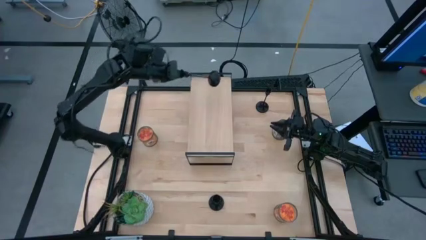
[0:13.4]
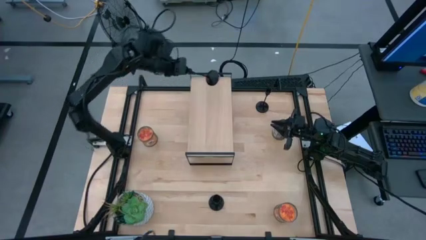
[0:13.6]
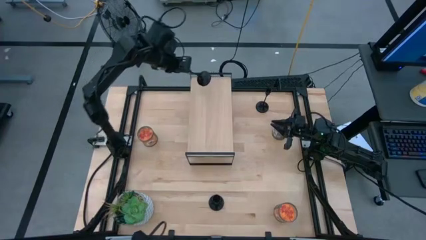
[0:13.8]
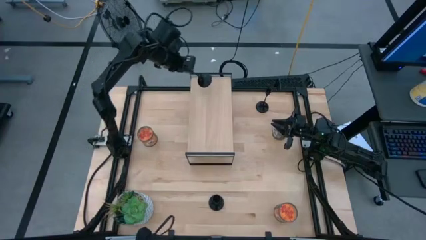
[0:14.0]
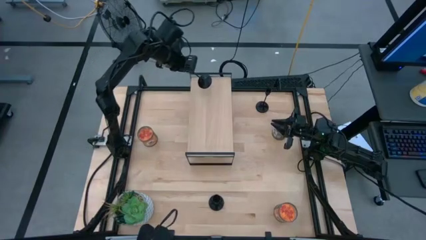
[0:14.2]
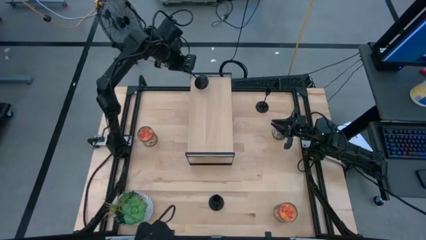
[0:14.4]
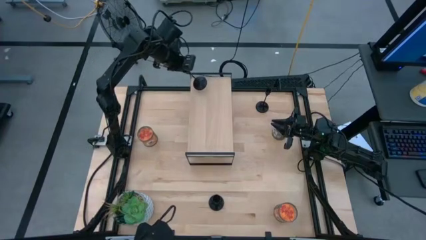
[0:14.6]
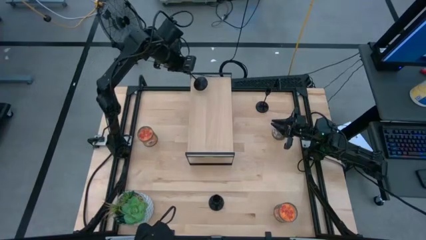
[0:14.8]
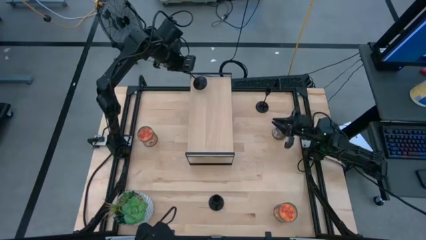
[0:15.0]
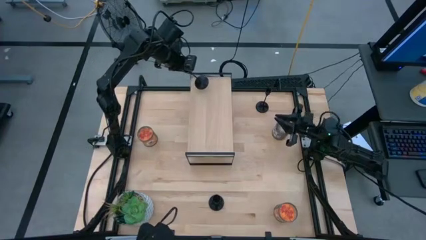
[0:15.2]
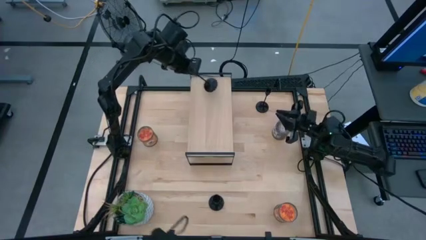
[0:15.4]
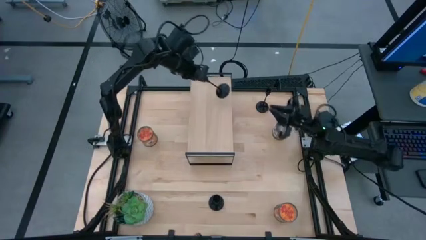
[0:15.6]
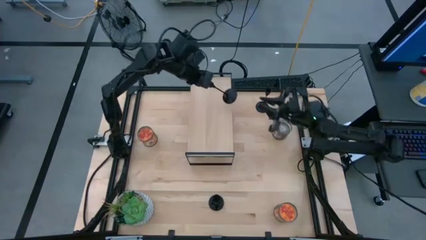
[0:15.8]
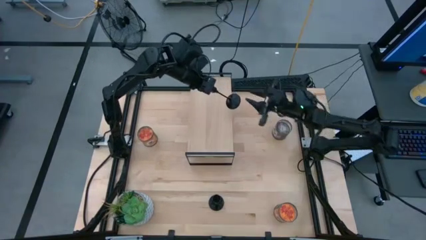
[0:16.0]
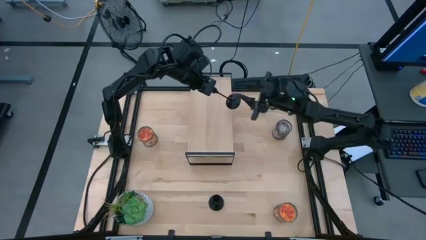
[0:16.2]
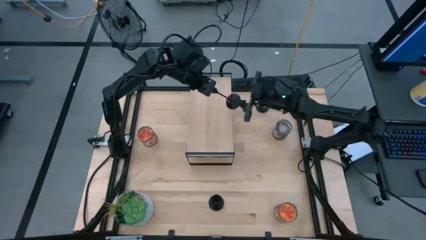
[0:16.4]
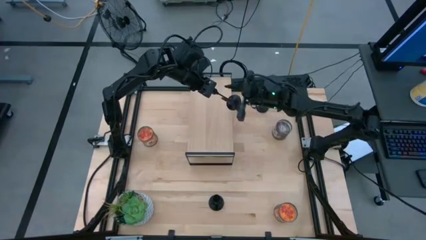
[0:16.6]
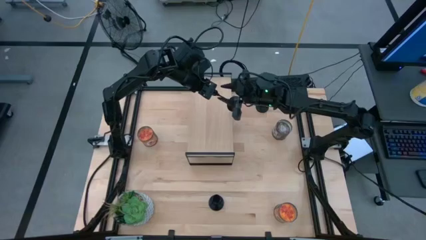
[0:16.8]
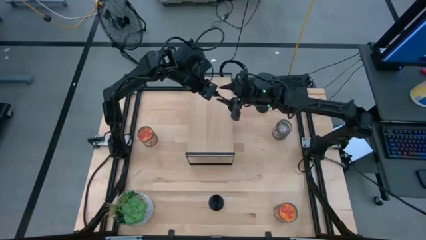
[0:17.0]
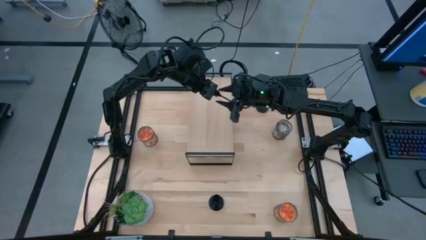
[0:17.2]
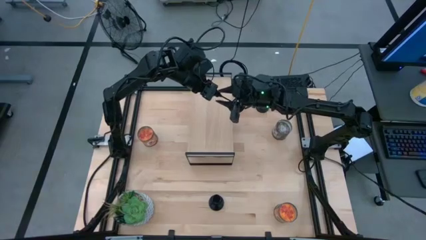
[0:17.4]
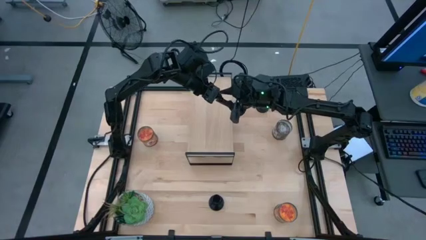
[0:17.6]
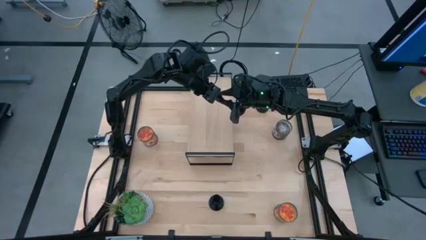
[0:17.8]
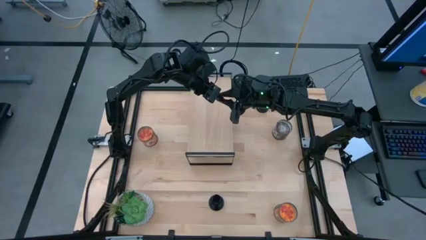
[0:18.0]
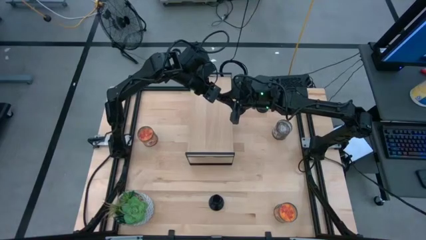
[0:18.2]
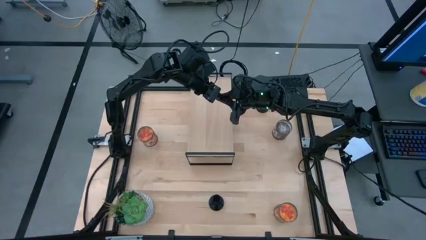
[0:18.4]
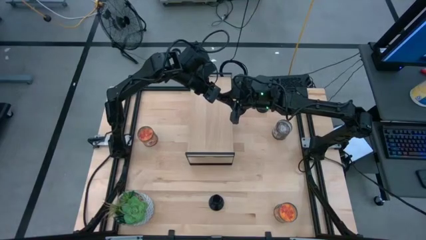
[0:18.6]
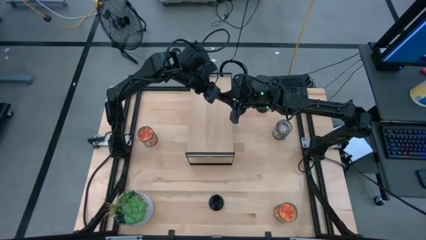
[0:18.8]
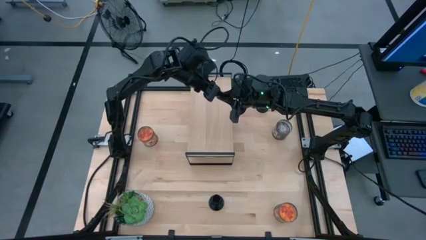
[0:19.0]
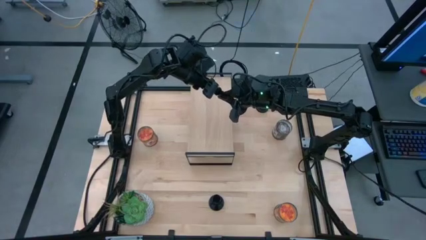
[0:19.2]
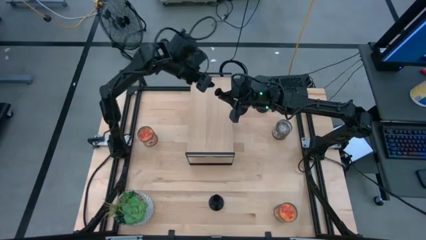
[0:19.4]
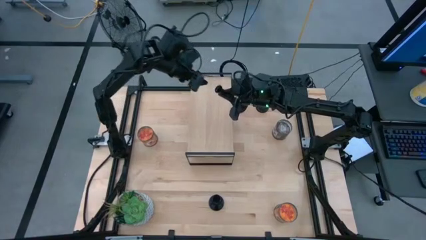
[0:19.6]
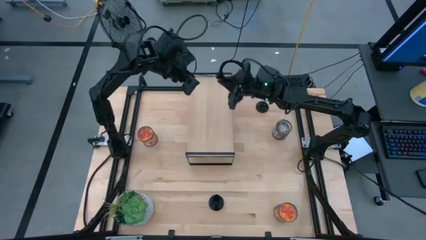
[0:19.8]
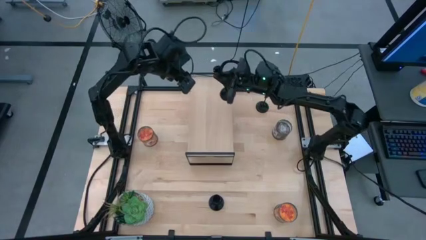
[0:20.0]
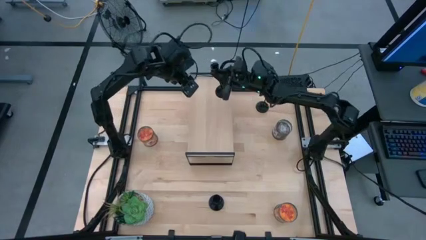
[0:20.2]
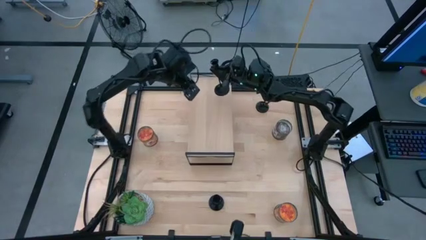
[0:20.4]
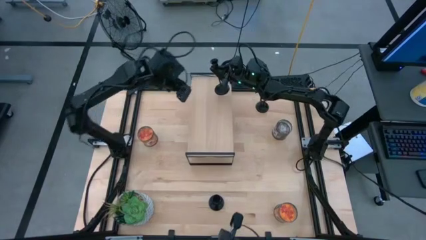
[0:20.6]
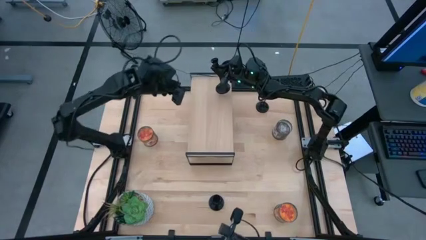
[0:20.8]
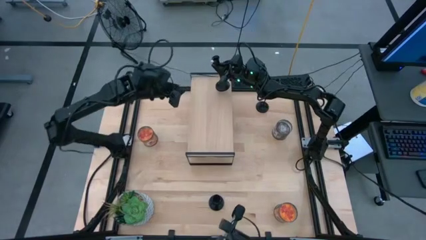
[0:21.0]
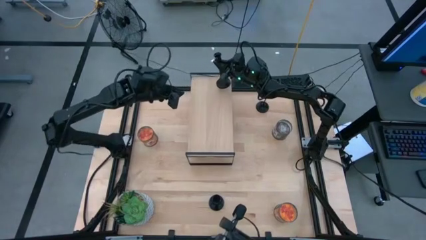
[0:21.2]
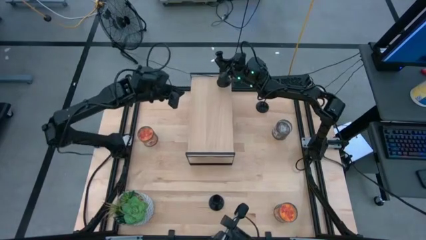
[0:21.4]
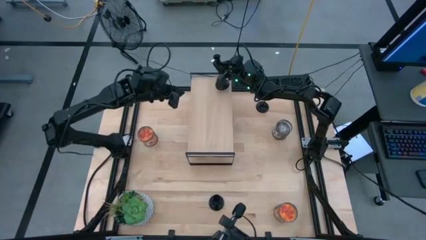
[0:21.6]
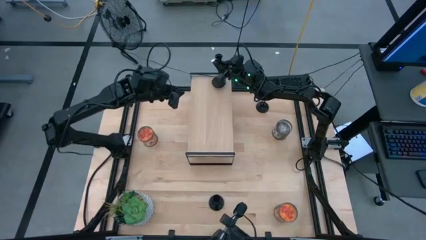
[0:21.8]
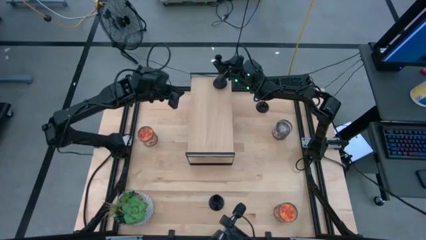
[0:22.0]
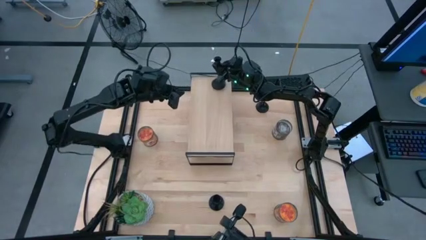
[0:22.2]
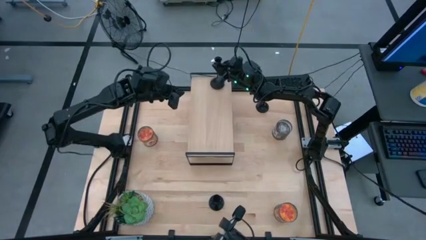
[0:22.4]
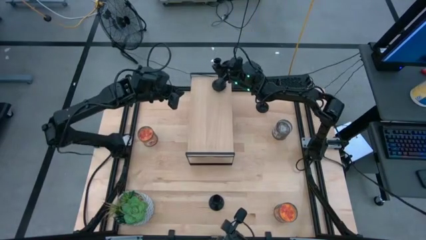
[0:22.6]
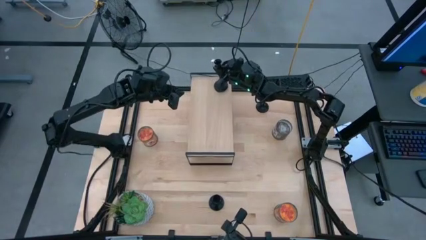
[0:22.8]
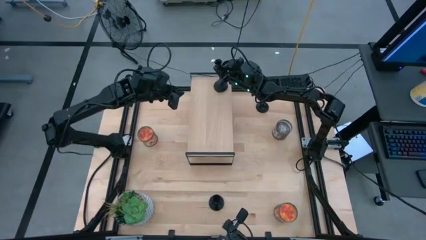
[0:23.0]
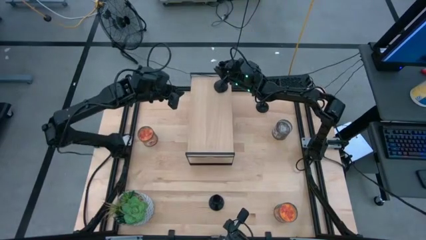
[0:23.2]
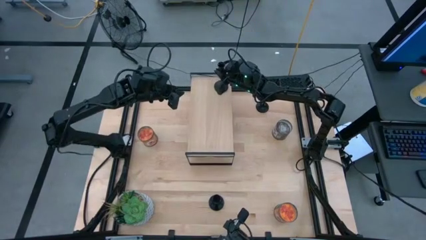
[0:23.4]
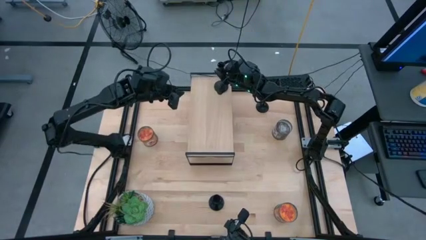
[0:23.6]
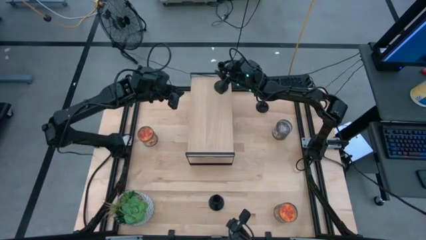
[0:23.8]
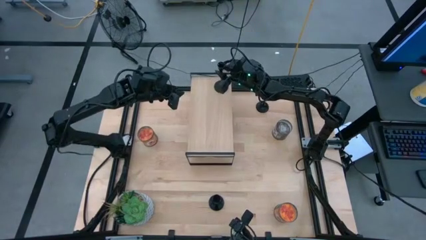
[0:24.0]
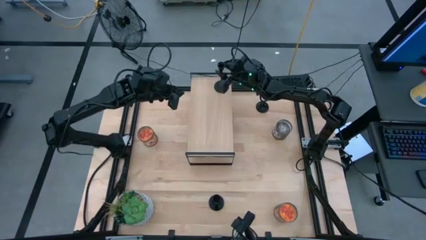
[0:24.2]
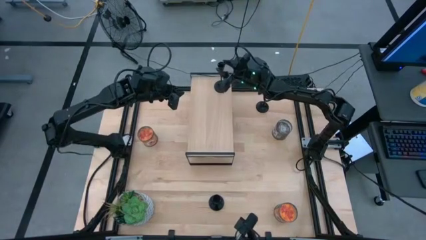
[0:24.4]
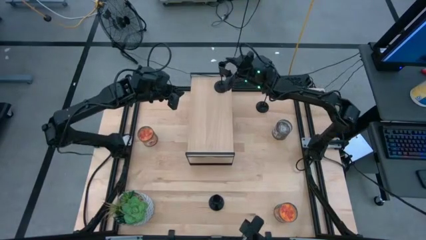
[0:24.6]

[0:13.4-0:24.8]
Task: Pick & Place candle stick holders
Put the top left black candle holder on the shelf

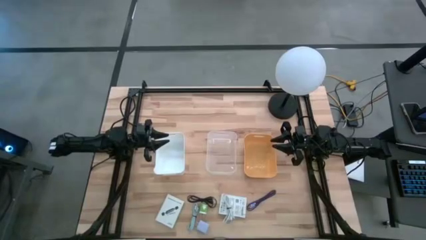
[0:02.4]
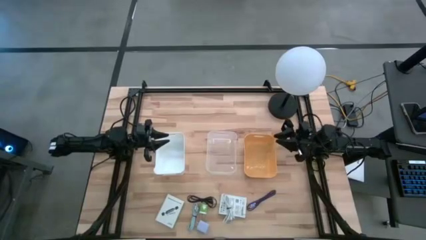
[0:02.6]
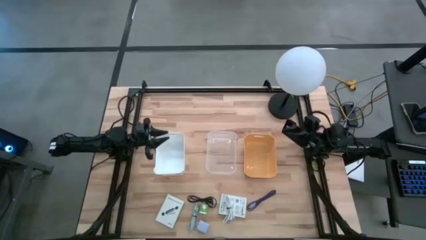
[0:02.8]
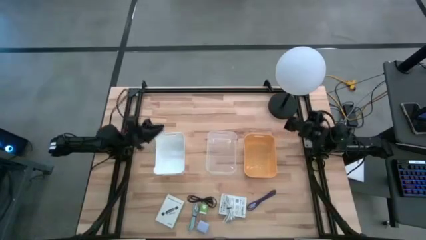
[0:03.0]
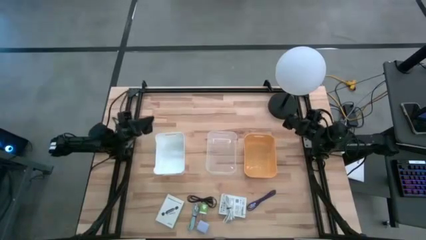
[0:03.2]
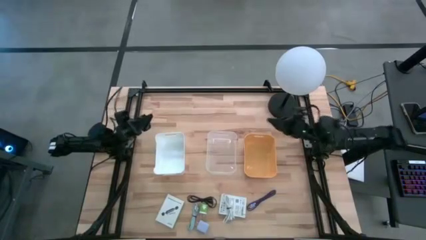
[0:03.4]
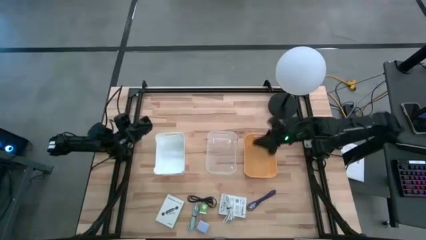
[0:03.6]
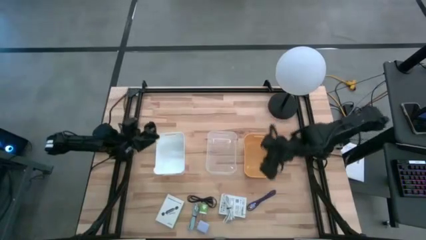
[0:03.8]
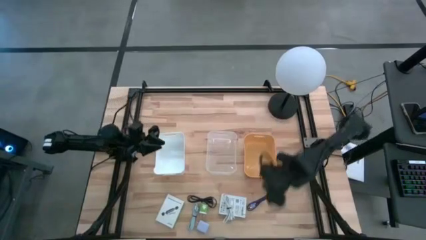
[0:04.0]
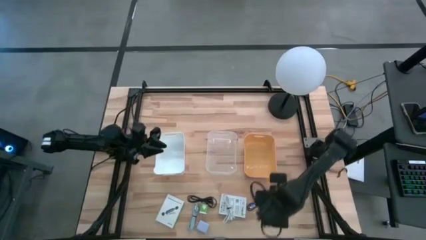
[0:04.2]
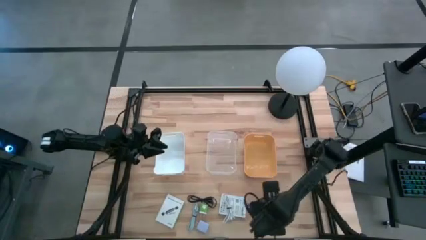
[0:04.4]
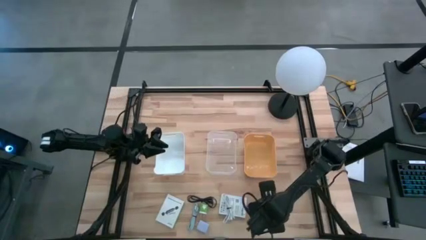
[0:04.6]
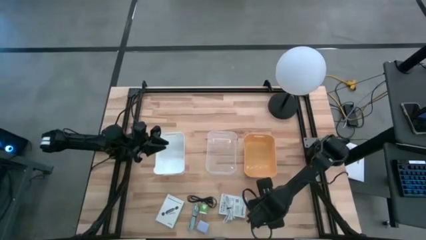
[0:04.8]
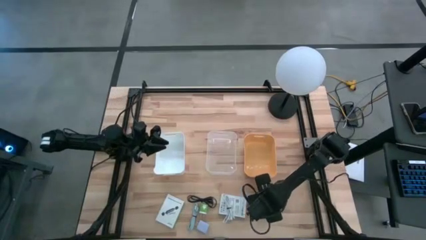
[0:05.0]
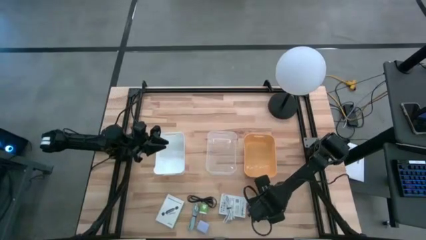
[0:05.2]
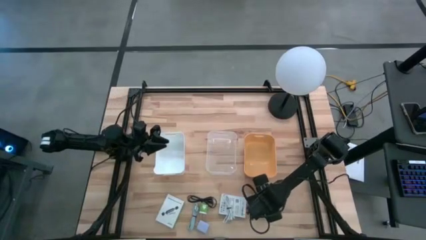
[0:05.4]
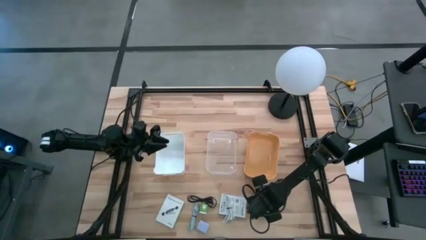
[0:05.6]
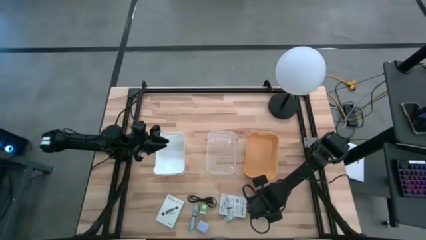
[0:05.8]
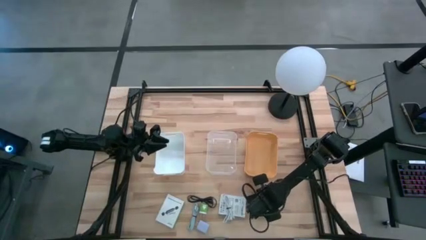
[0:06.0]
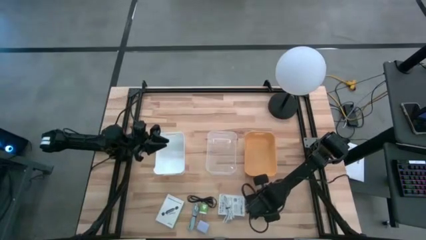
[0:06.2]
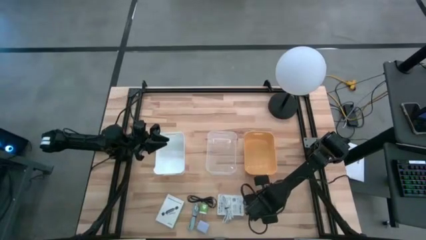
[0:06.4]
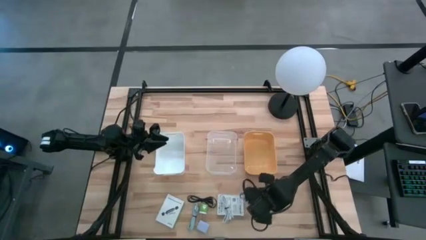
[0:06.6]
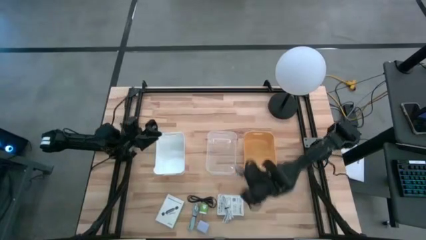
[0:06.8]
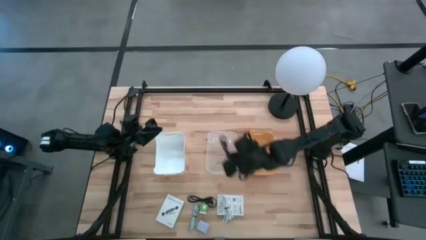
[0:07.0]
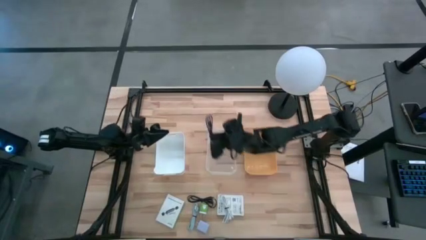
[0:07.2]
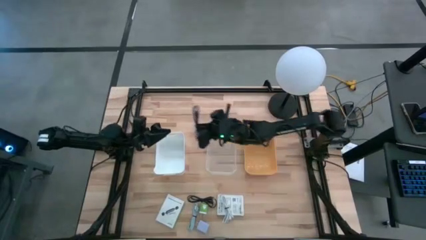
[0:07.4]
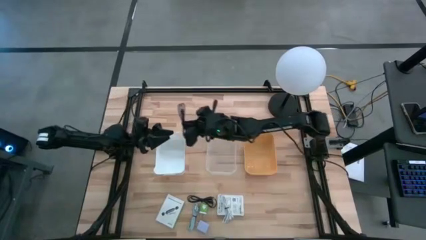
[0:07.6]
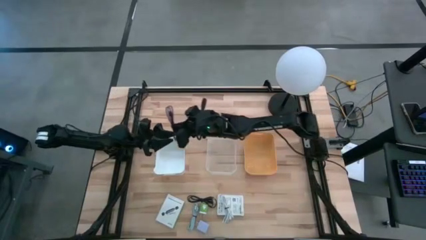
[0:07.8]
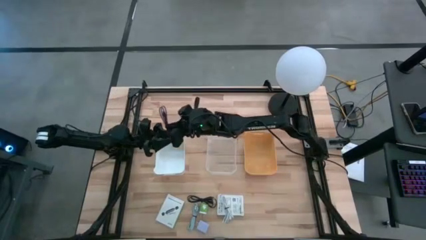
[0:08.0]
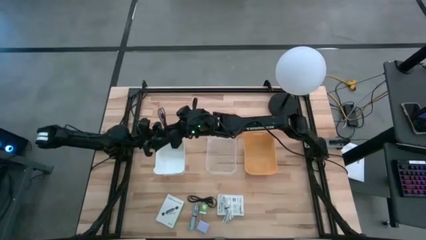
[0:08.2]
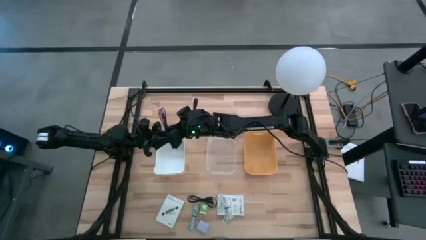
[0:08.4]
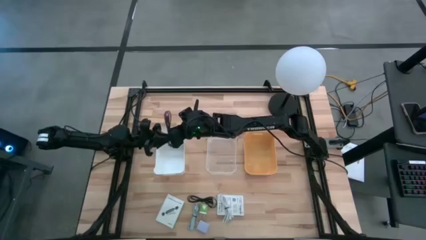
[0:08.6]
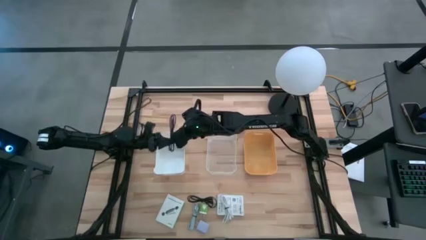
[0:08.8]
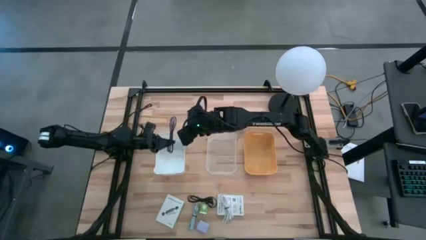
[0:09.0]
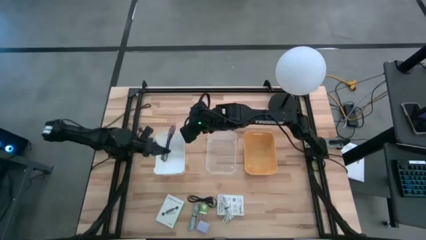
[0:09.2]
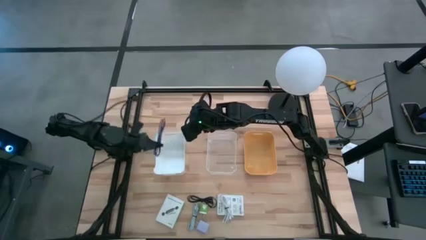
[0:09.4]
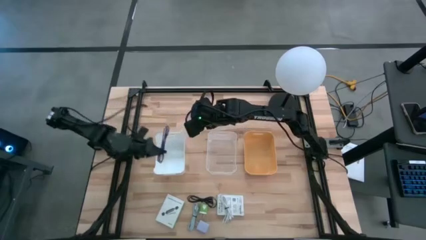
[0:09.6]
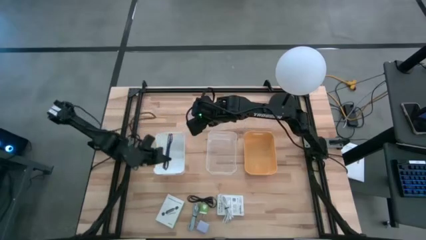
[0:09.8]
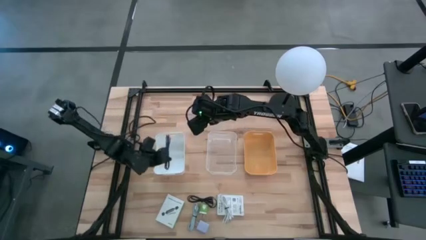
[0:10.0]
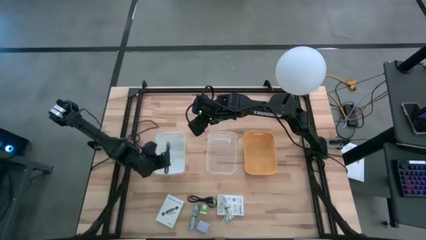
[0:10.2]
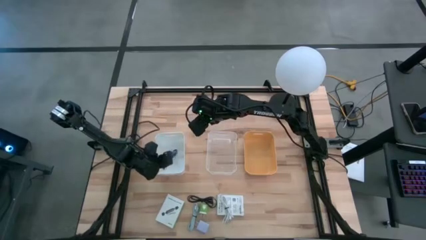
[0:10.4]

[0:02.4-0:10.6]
Task: Pick and place items into bin
Put the violet charger cable into the white bin
